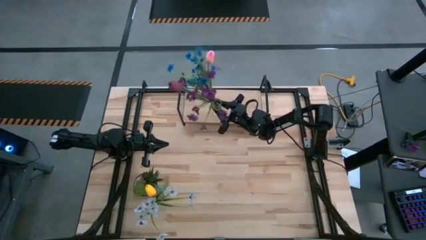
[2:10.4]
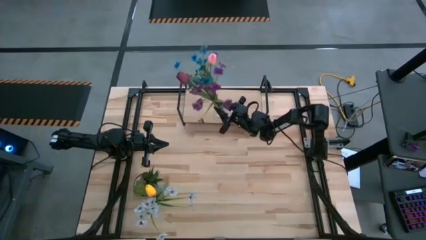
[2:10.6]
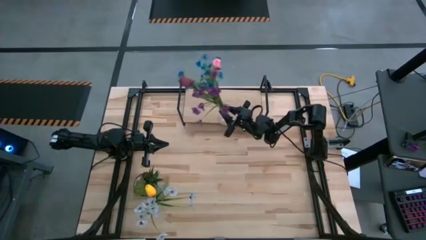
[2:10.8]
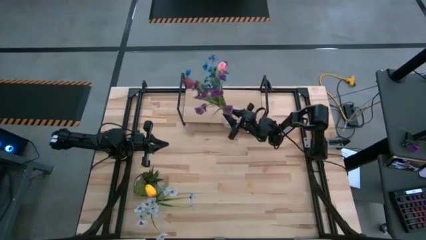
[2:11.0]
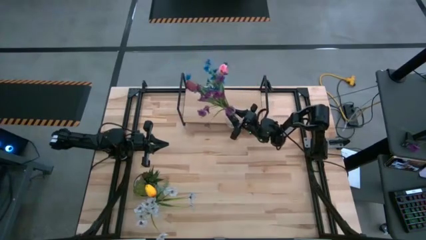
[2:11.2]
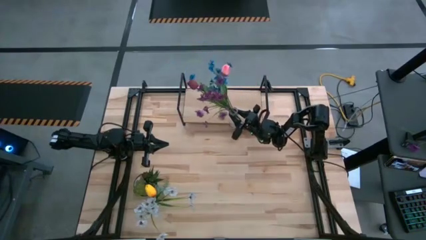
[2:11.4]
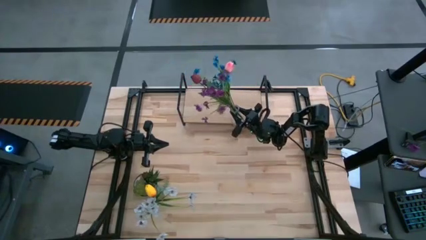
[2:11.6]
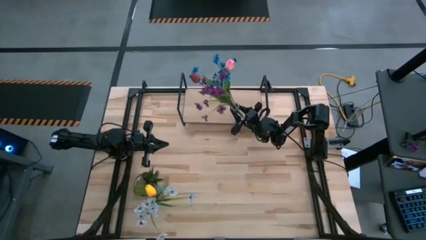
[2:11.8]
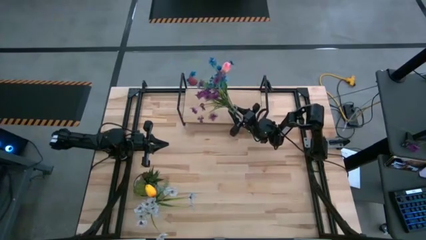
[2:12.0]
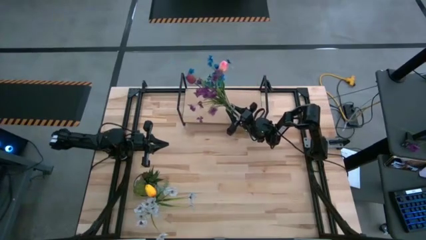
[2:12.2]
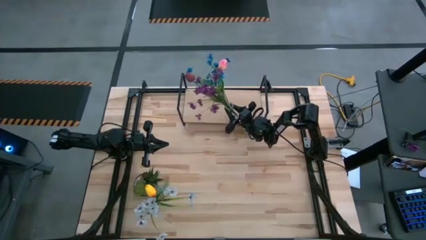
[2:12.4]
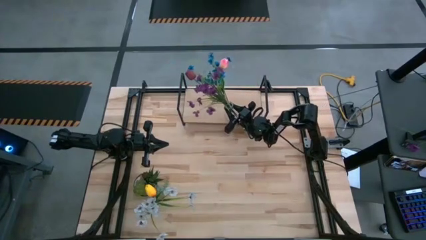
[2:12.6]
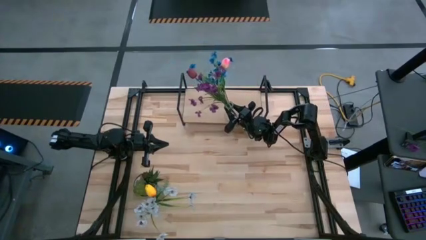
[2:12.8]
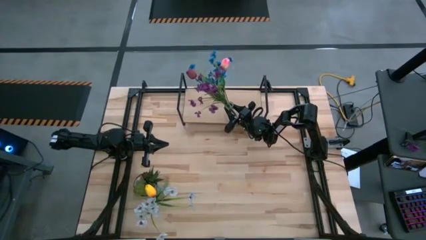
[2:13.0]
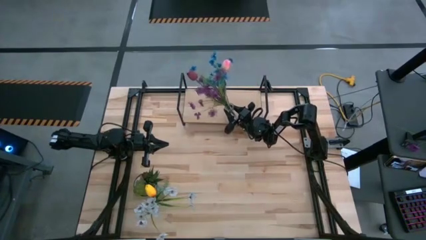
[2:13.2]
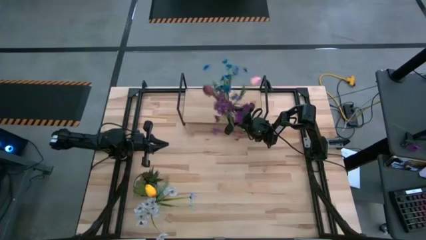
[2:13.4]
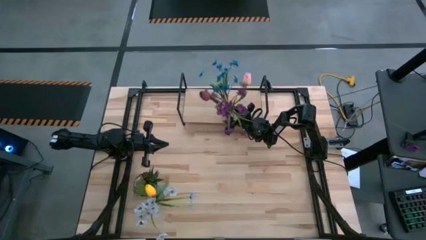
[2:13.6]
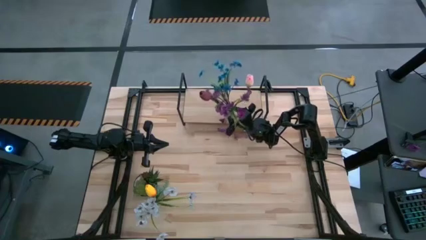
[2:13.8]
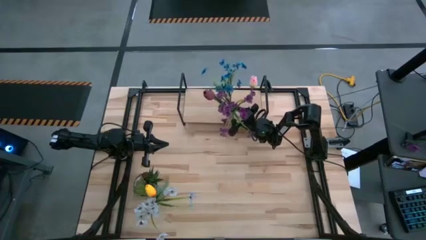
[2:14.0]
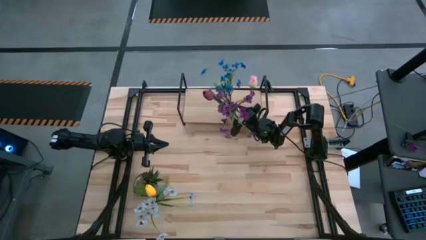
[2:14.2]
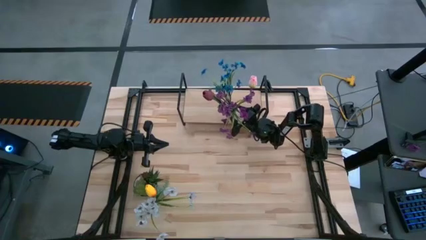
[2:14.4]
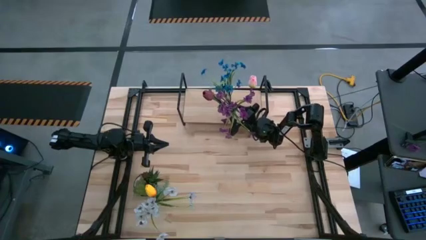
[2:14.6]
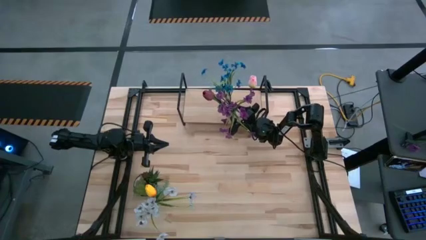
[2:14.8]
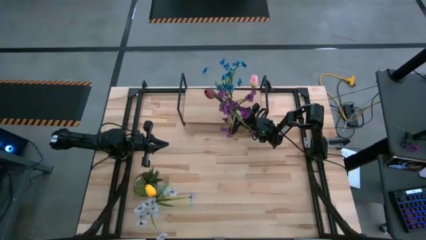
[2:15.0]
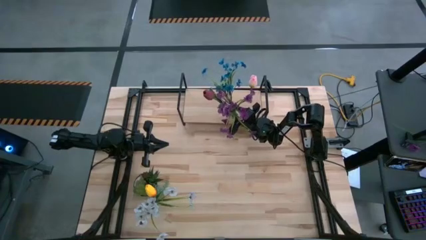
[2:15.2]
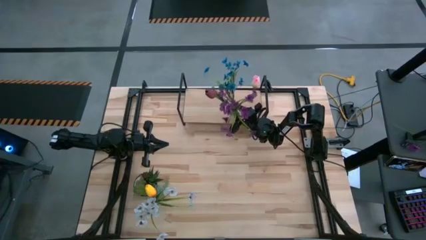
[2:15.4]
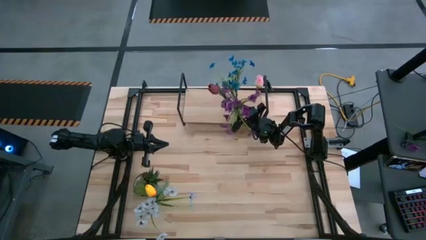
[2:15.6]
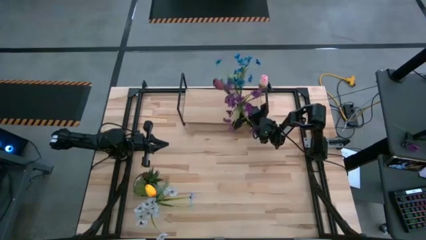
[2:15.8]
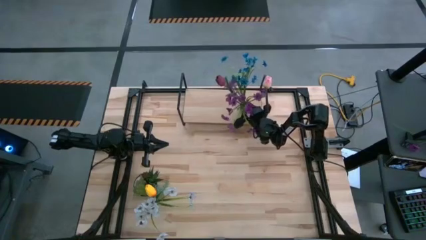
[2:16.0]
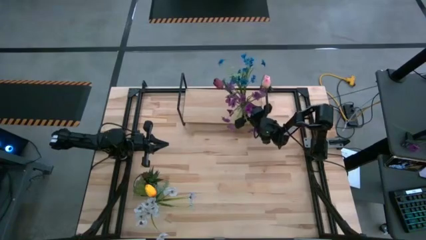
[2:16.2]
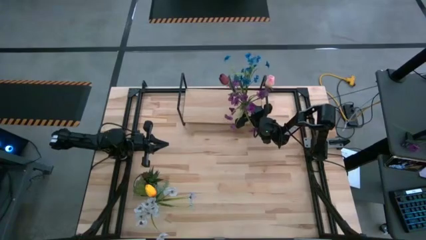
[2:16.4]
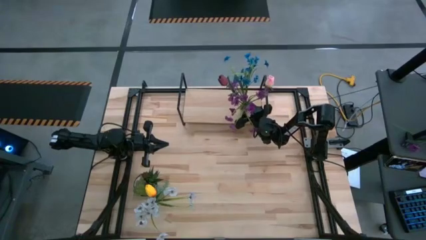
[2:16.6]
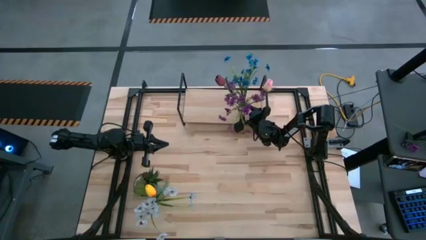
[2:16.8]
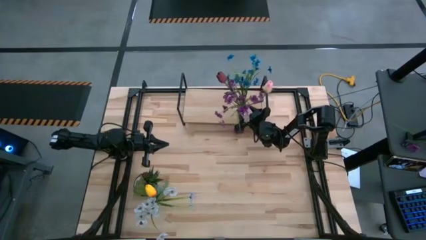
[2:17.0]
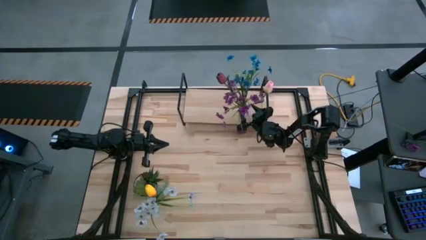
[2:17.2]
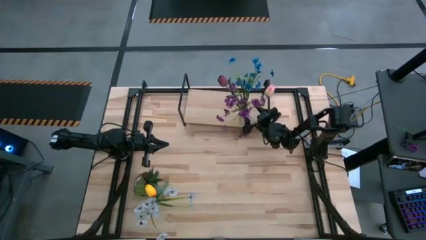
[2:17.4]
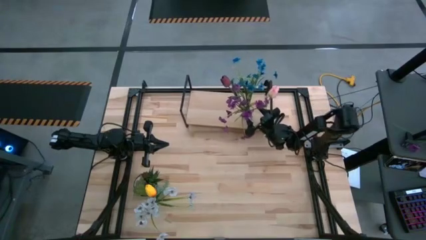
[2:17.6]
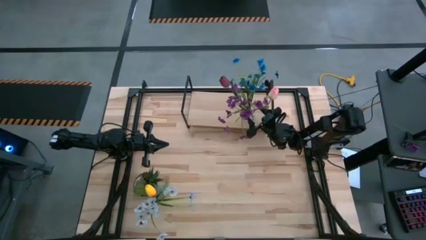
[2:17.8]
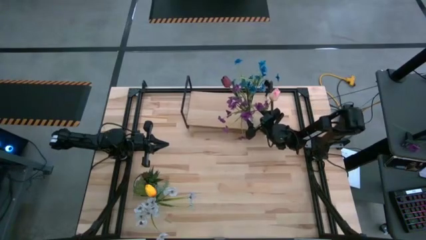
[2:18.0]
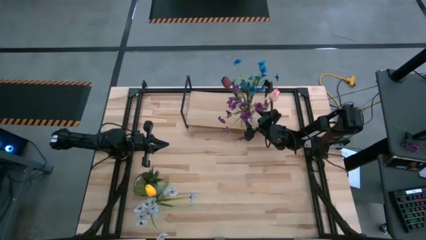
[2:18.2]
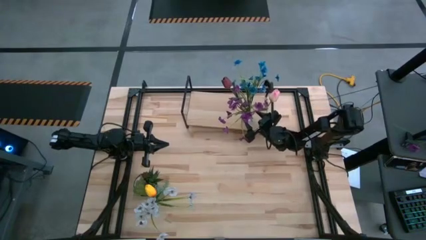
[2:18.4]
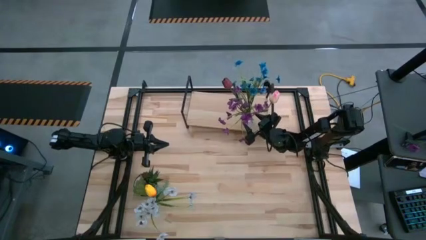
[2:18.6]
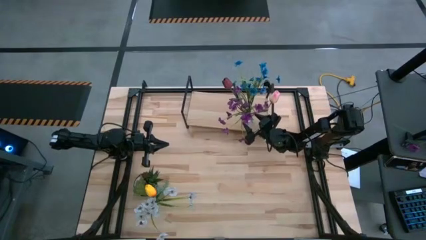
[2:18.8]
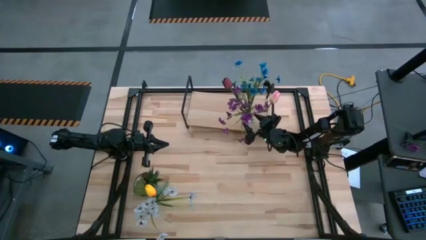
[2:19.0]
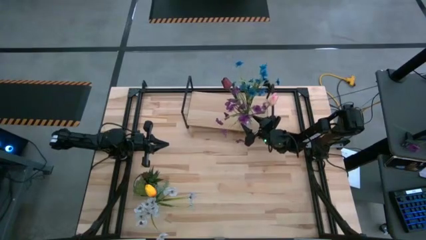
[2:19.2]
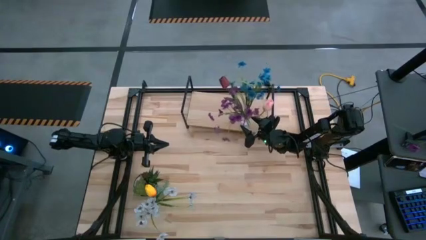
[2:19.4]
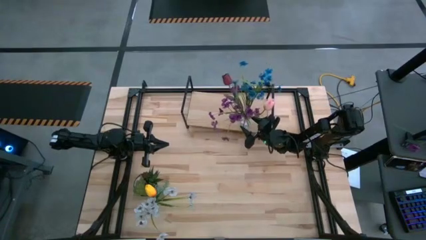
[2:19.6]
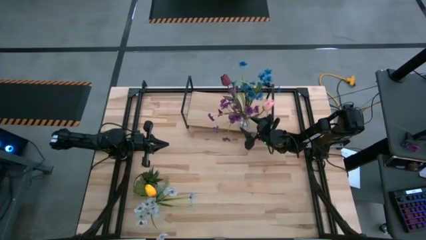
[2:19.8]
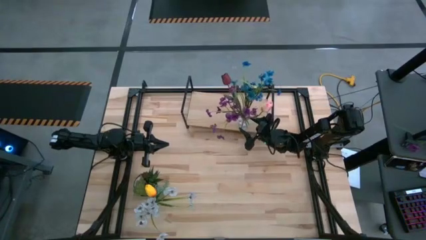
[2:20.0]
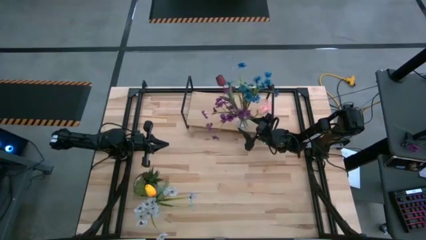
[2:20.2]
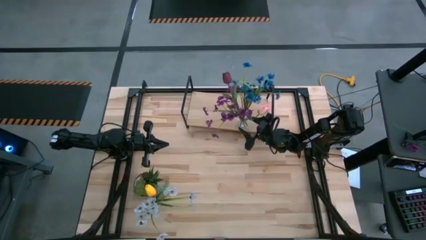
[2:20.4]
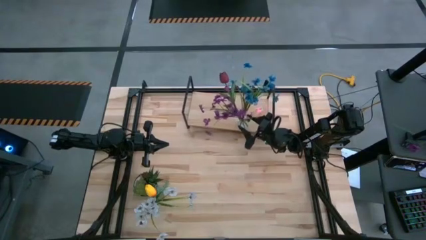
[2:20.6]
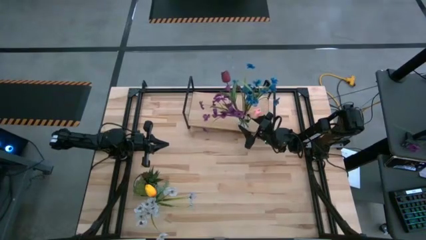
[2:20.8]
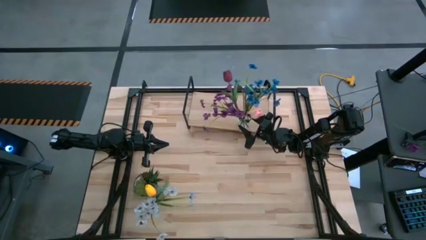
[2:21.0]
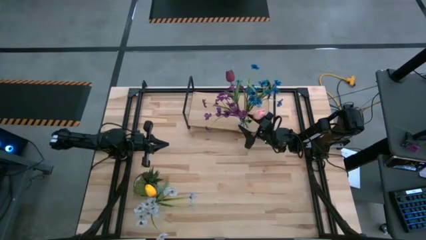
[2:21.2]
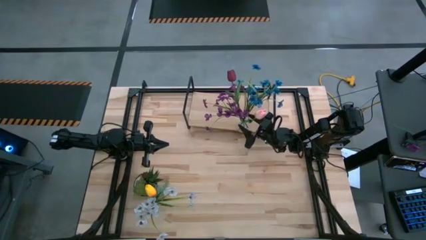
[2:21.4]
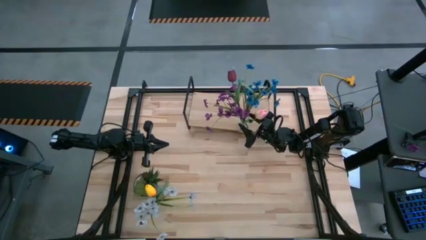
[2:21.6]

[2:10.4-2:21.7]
Task: Pick and place flowers into a vace then onto a shelf
Put the right transparent vase on the shelf
